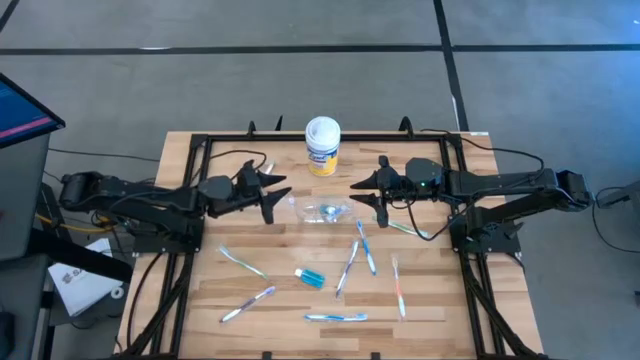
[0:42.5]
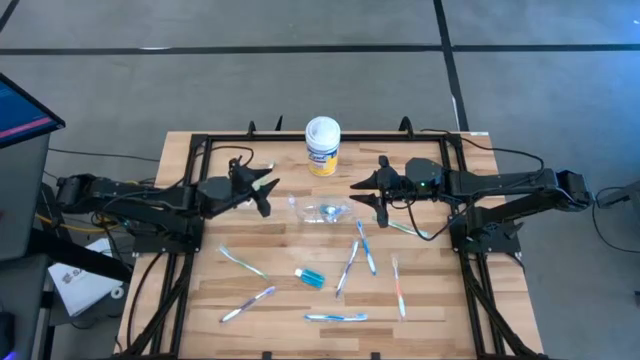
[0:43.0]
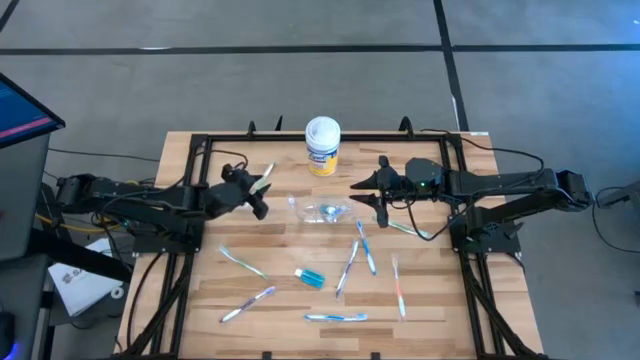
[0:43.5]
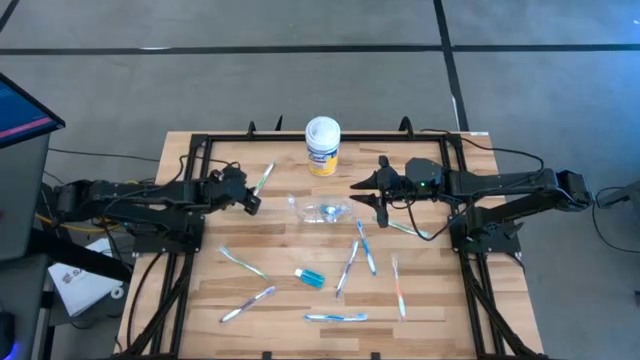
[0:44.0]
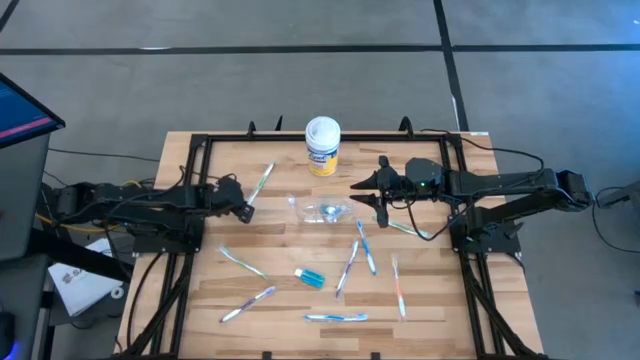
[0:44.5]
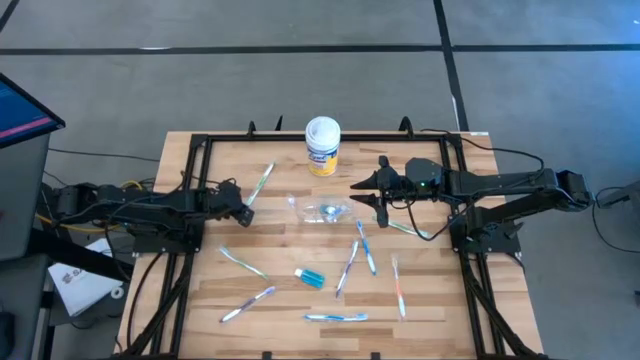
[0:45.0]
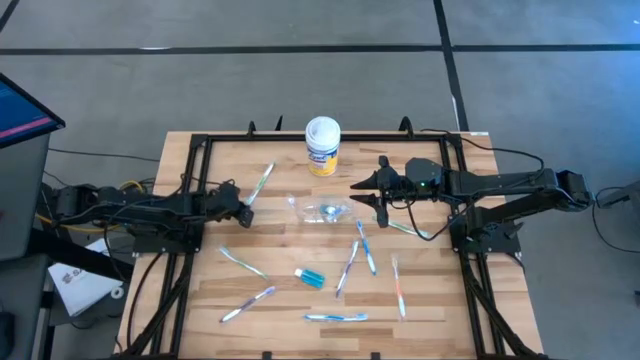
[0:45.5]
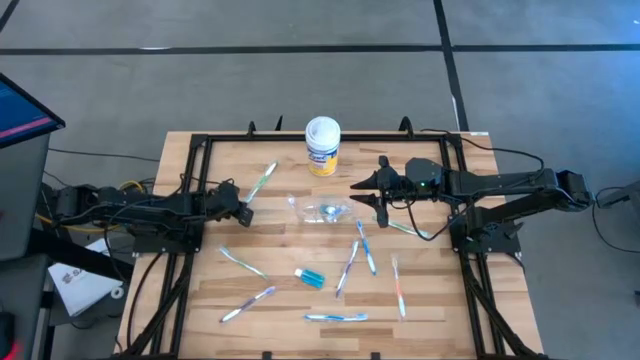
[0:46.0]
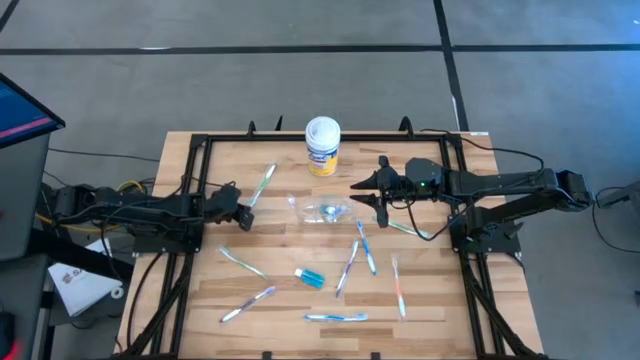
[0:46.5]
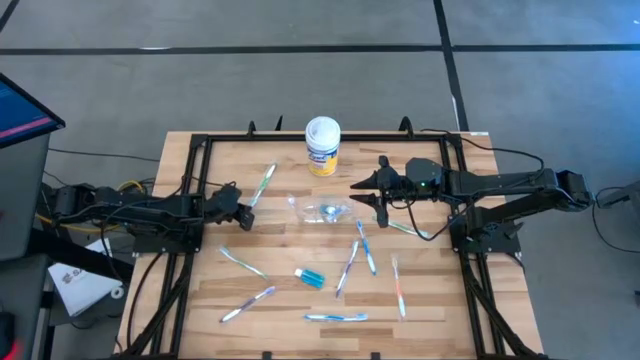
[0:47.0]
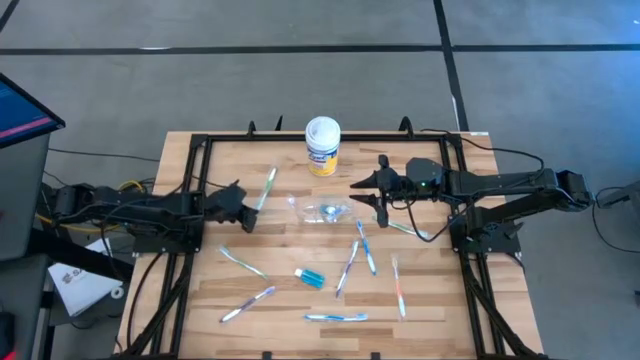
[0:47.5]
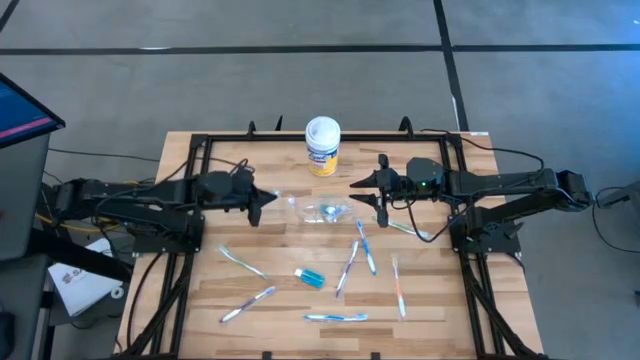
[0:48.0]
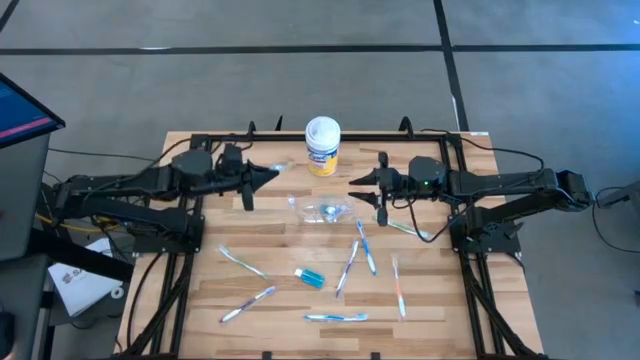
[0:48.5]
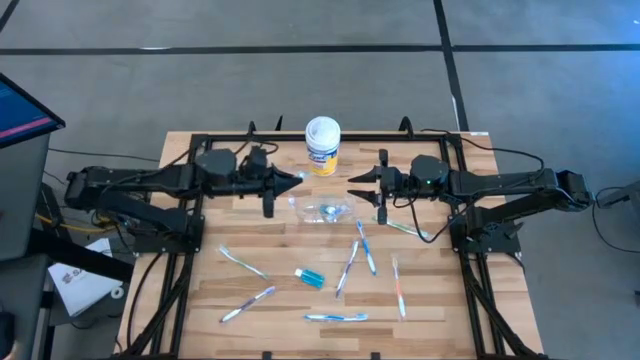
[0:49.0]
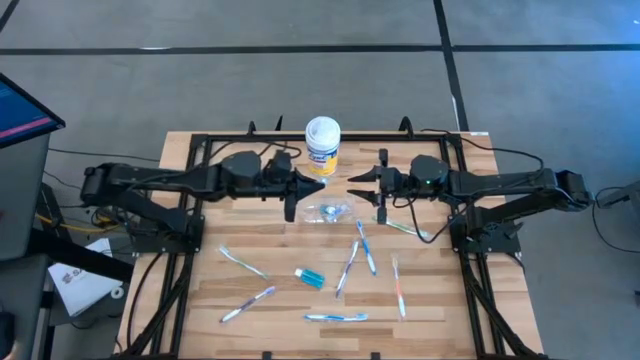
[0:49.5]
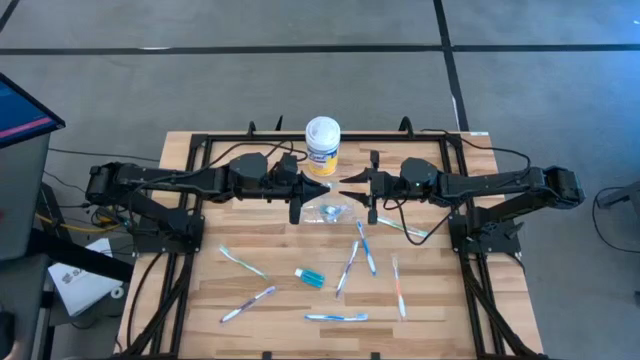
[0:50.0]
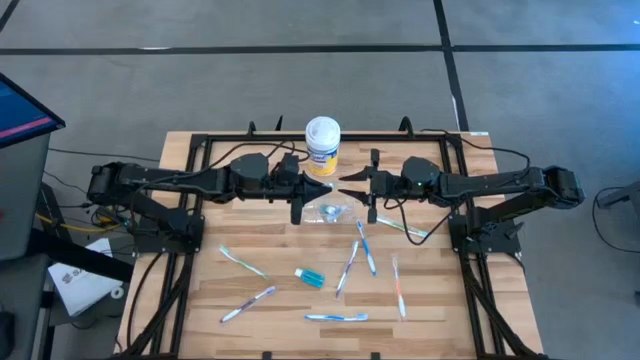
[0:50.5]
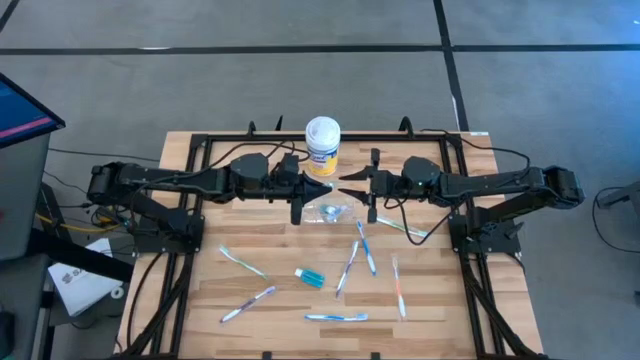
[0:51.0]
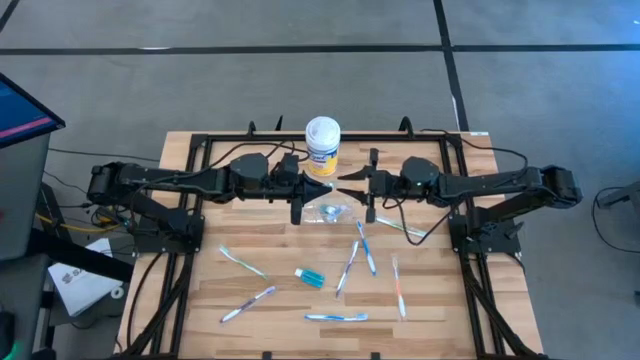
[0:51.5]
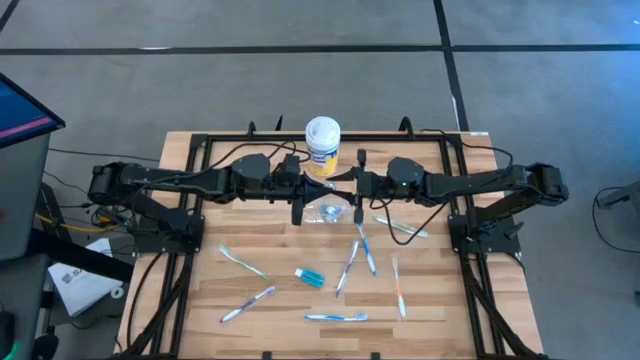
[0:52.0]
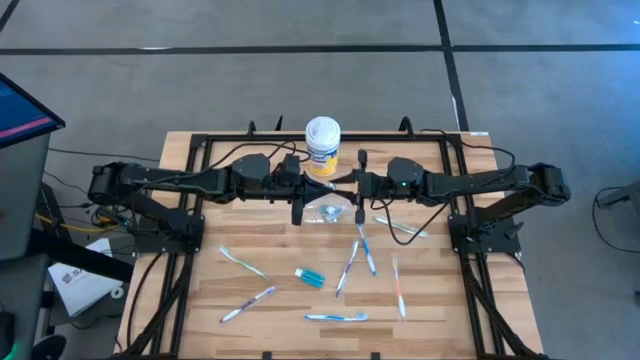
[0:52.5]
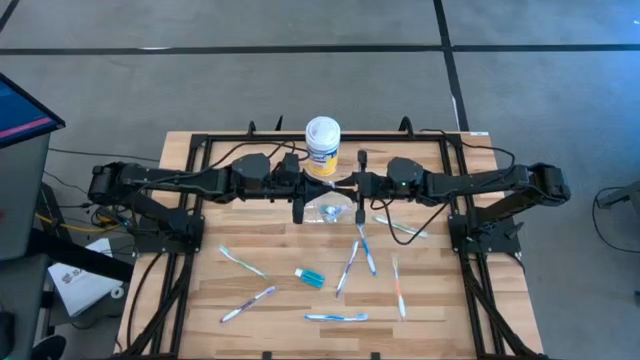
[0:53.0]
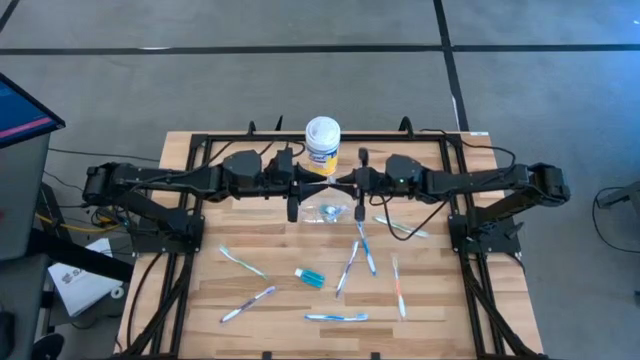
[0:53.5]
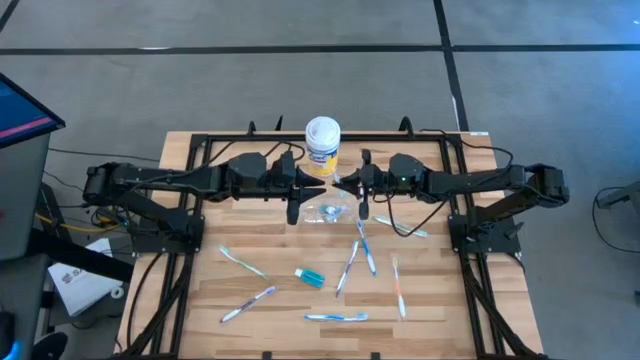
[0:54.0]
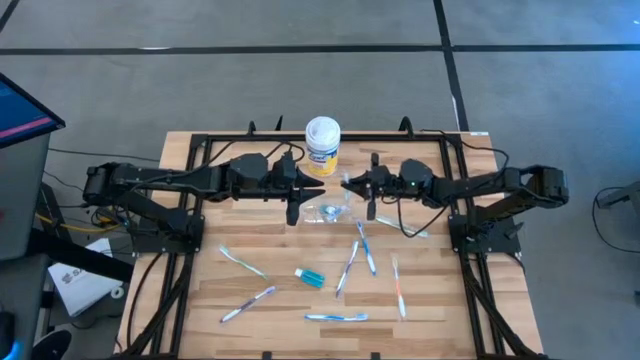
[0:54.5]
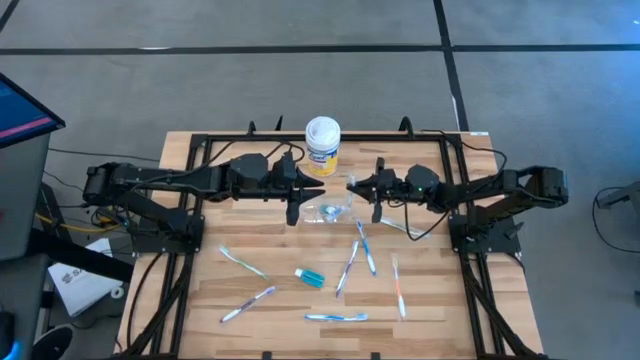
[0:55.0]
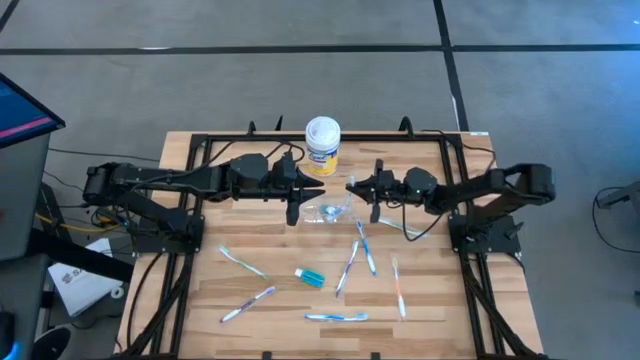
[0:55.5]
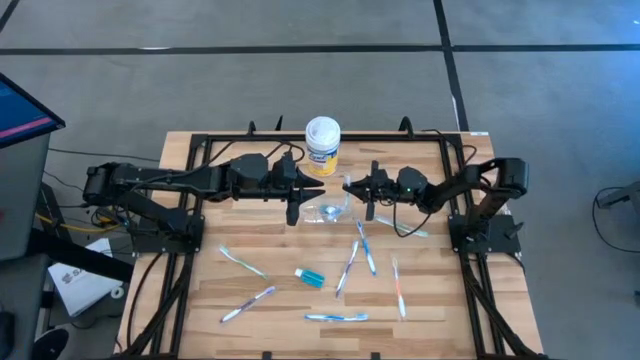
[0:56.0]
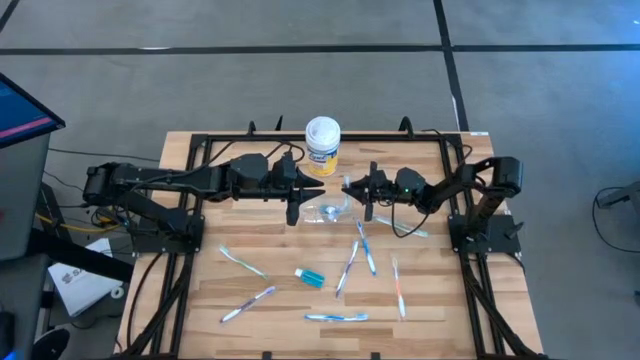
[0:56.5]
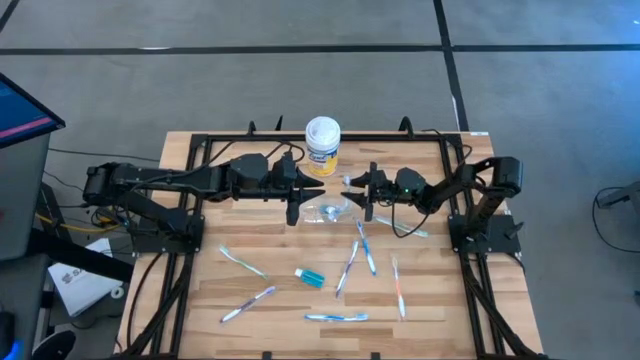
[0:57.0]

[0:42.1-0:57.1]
Task: Pick & Place toothbrushing station
Put the top green toothbrush into the transparent organizer

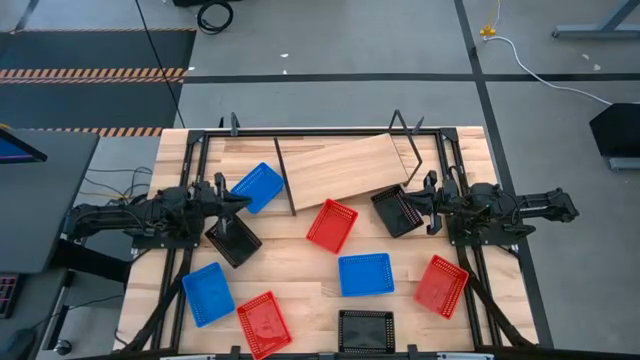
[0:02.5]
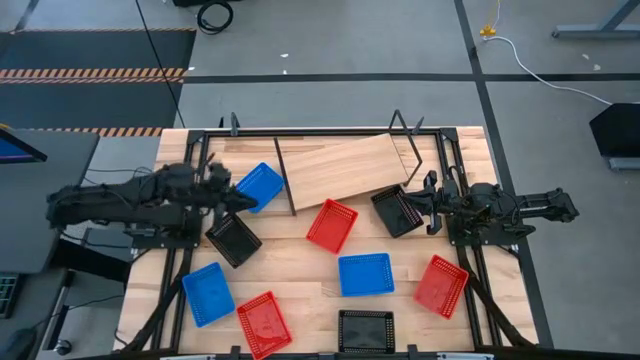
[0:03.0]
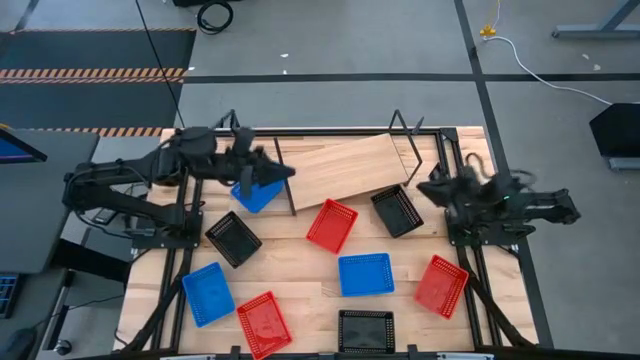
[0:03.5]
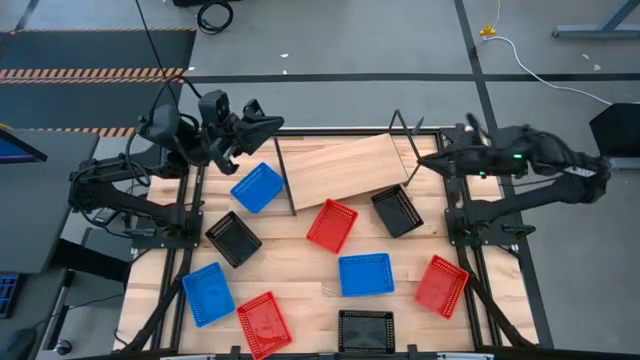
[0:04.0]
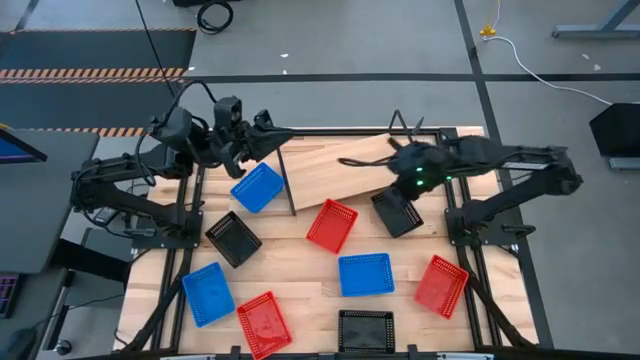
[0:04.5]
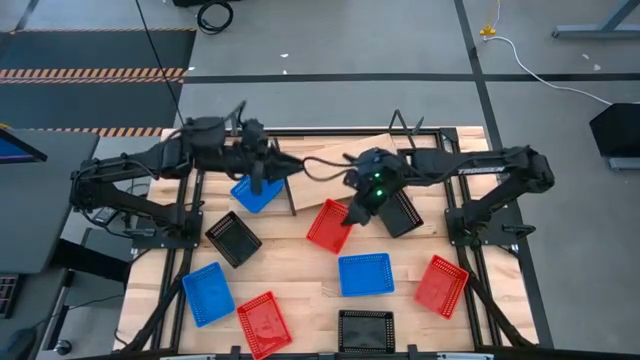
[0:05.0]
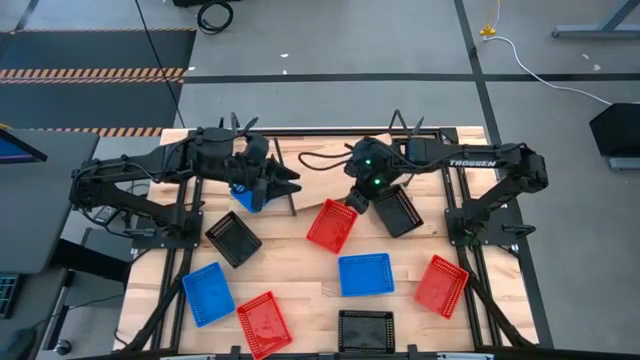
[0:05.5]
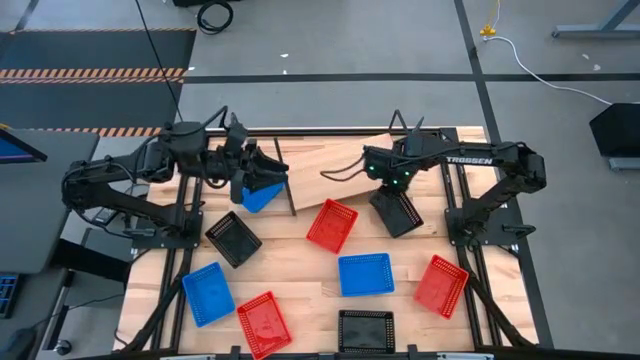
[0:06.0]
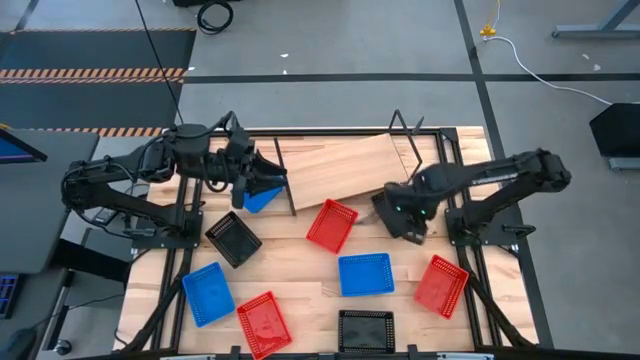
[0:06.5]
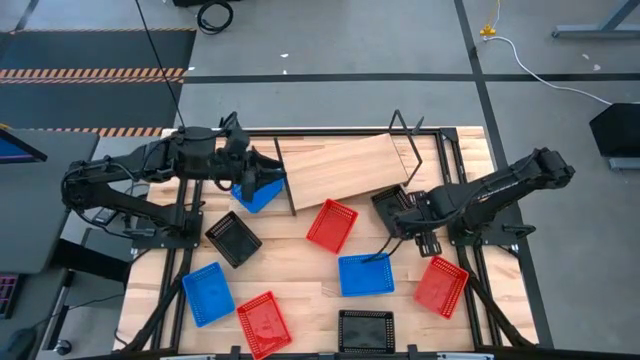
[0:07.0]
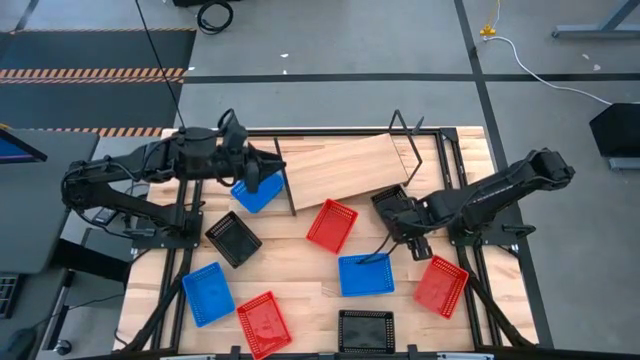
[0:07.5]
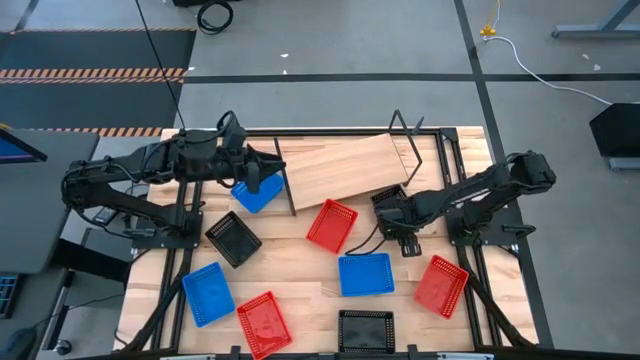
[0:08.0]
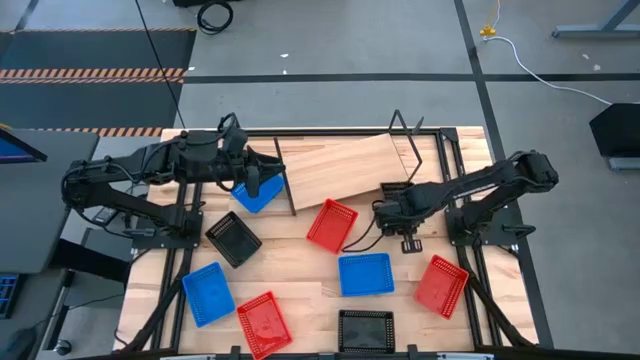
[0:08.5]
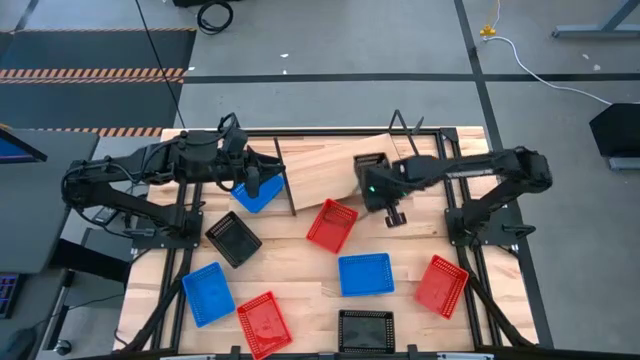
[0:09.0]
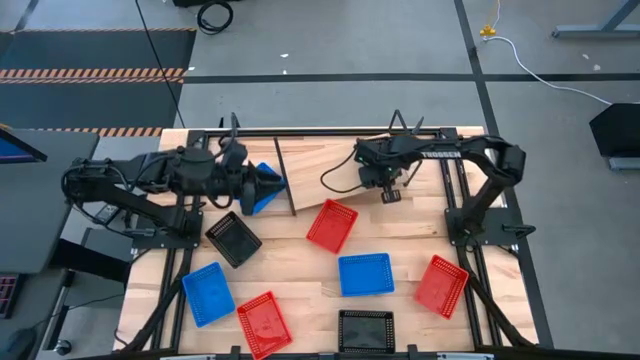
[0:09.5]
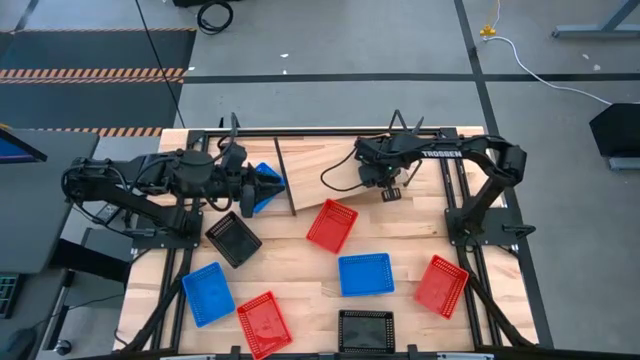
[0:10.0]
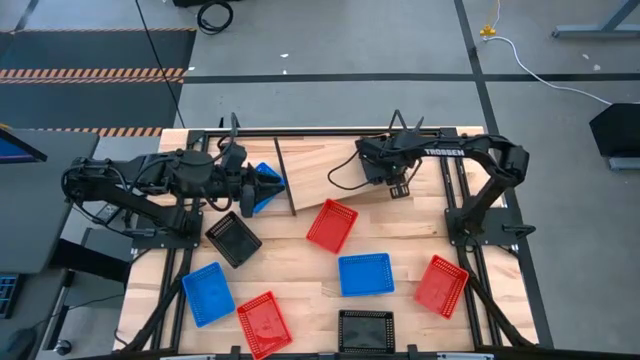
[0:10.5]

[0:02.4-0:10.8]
Task: Stack baskets on shelf by color
Put the top right black bin on the shelf
